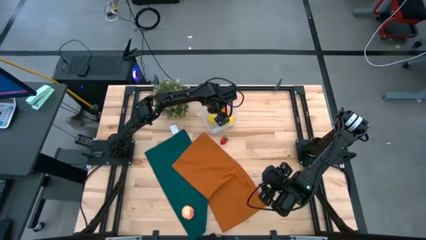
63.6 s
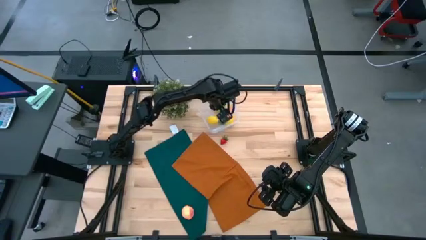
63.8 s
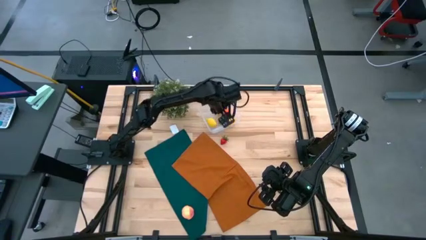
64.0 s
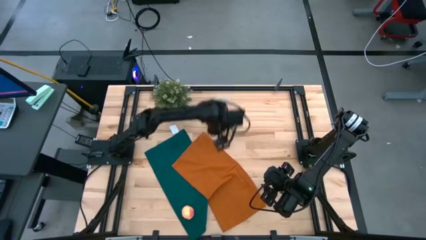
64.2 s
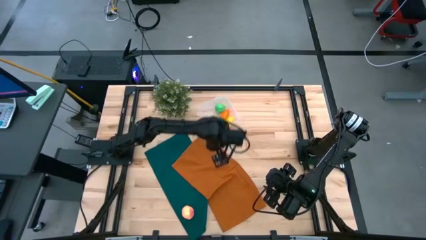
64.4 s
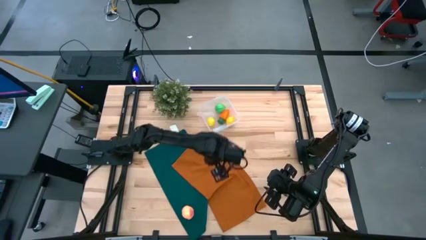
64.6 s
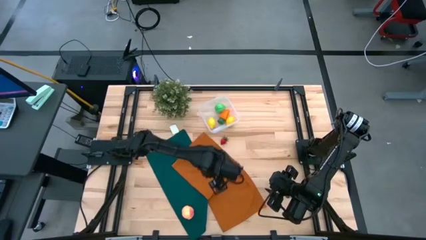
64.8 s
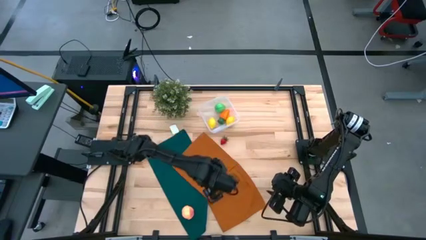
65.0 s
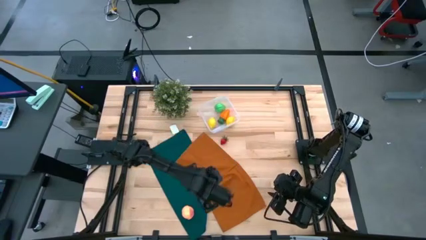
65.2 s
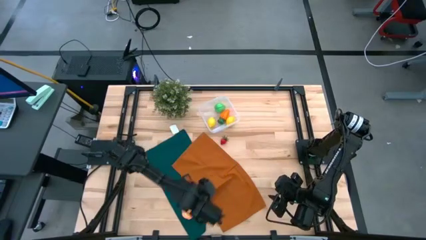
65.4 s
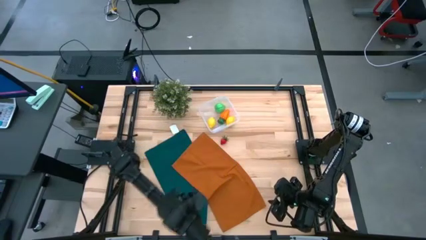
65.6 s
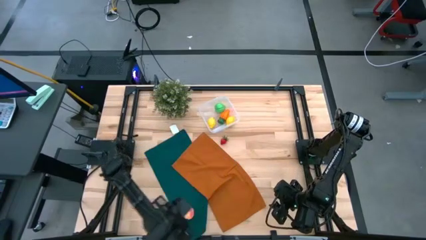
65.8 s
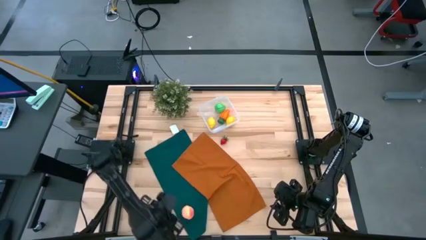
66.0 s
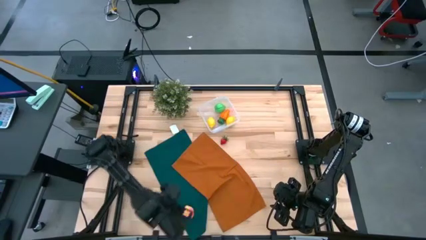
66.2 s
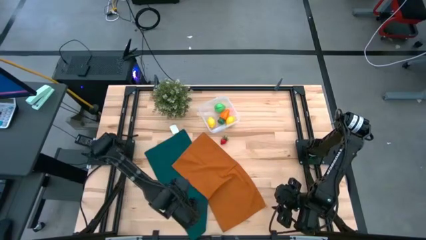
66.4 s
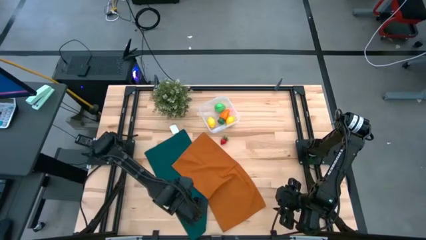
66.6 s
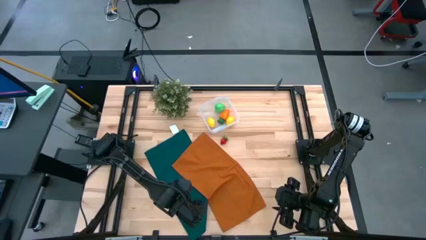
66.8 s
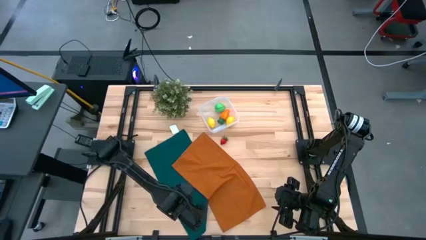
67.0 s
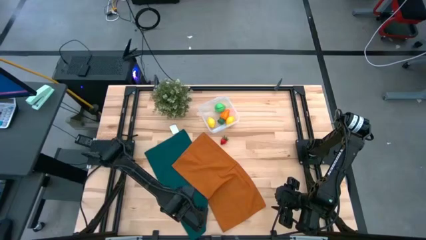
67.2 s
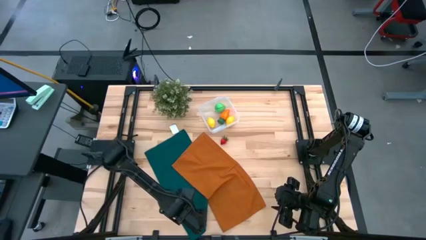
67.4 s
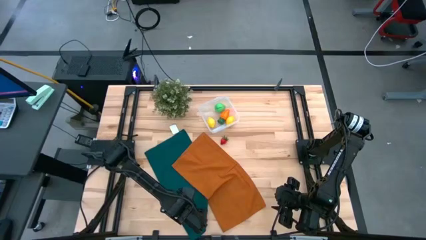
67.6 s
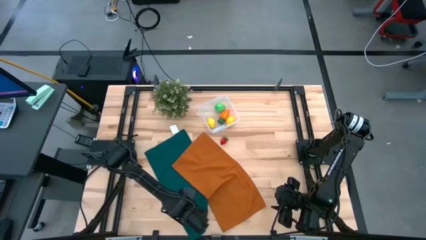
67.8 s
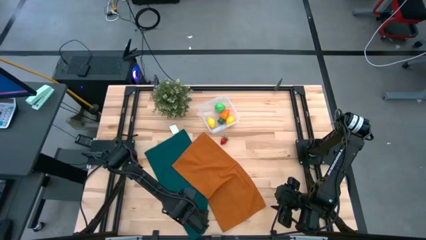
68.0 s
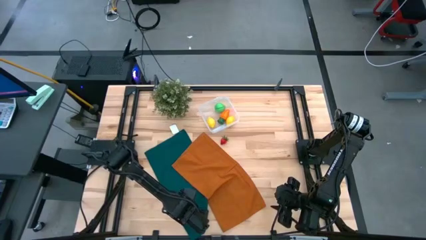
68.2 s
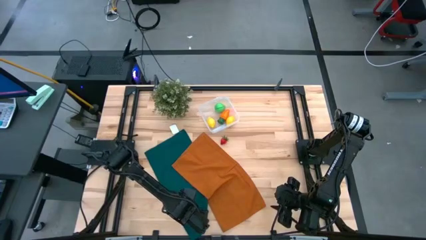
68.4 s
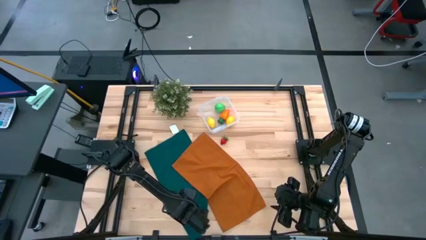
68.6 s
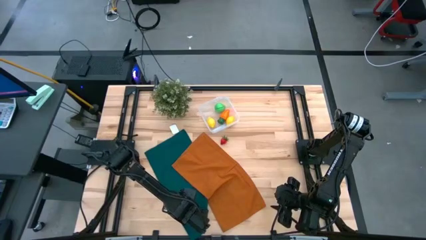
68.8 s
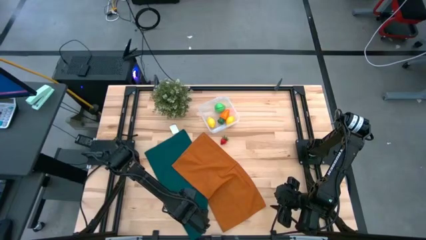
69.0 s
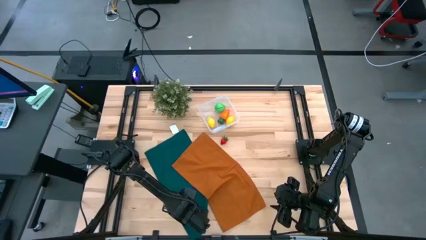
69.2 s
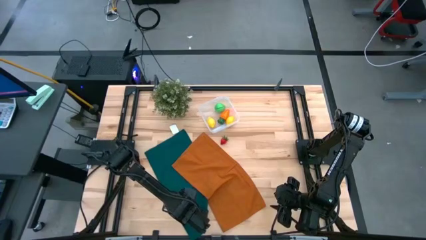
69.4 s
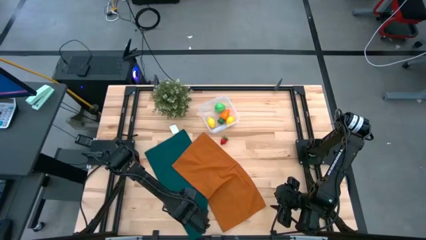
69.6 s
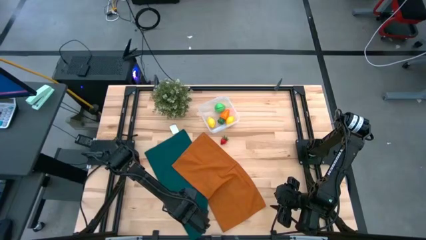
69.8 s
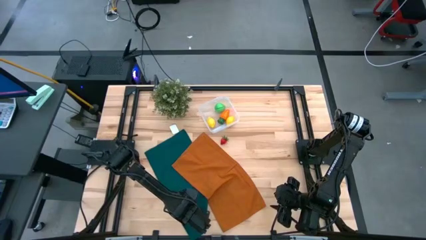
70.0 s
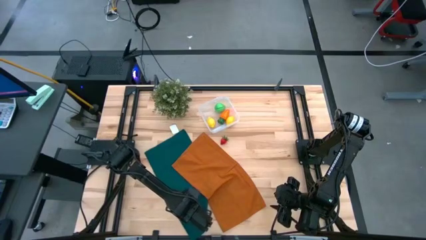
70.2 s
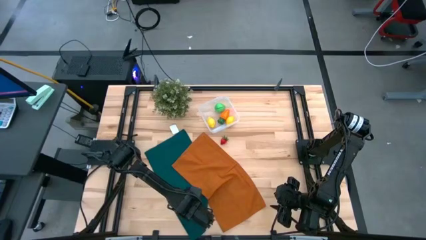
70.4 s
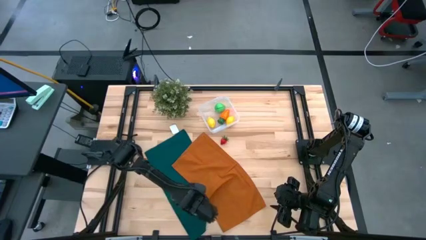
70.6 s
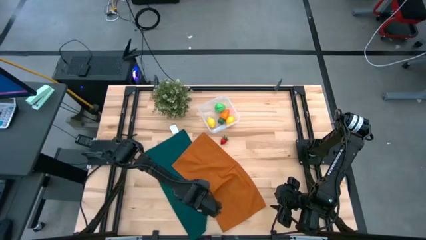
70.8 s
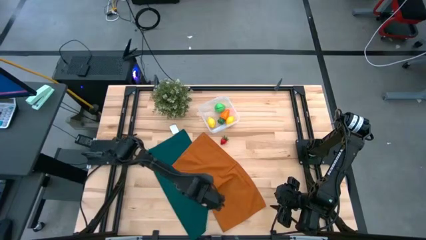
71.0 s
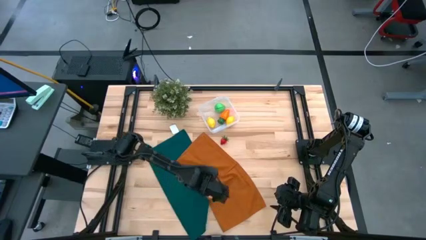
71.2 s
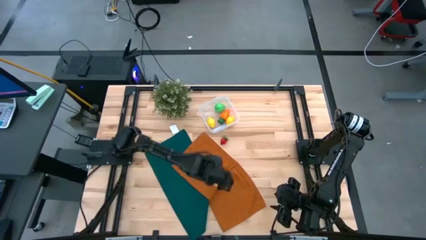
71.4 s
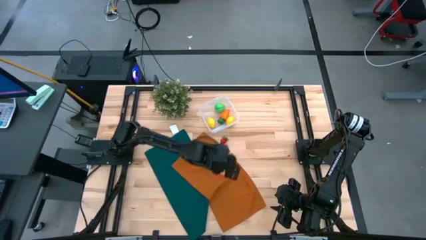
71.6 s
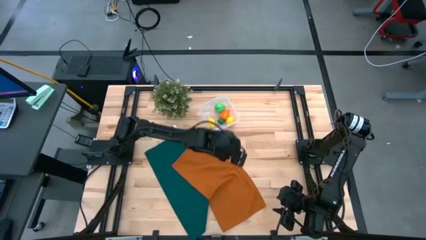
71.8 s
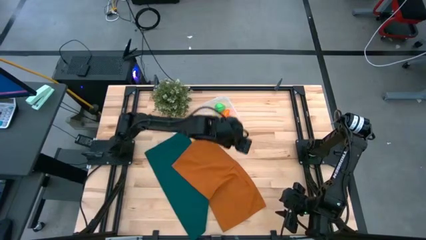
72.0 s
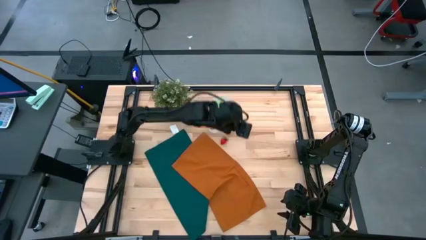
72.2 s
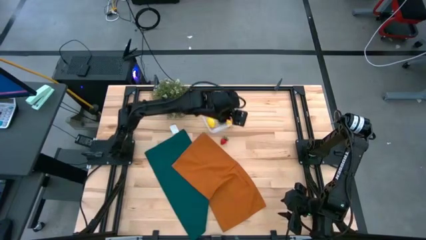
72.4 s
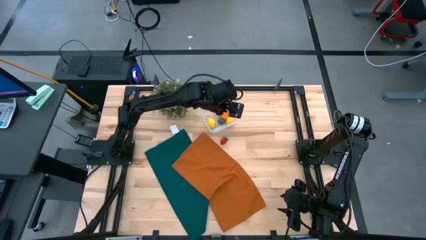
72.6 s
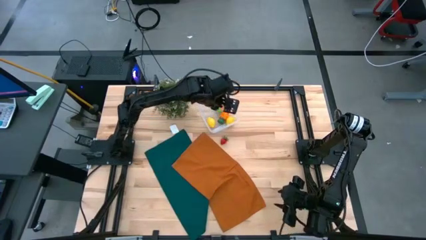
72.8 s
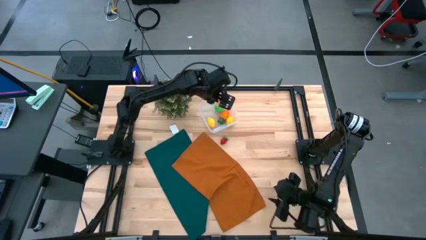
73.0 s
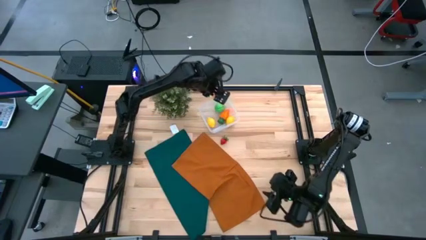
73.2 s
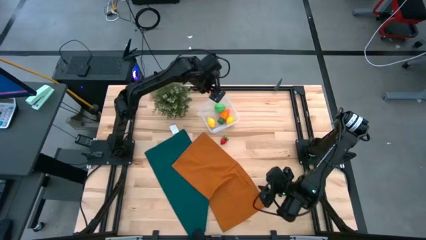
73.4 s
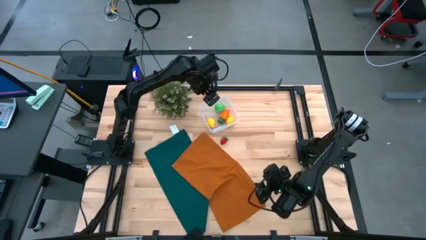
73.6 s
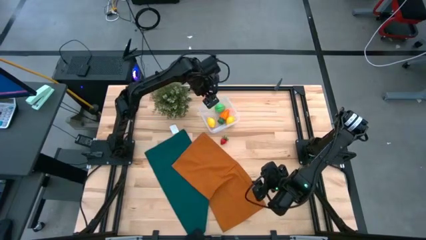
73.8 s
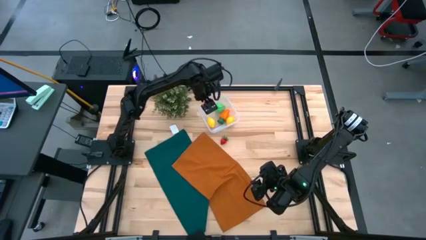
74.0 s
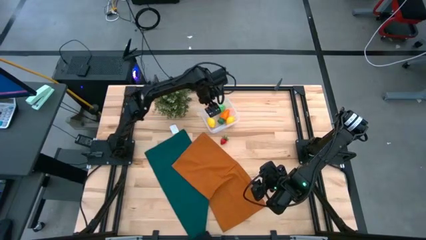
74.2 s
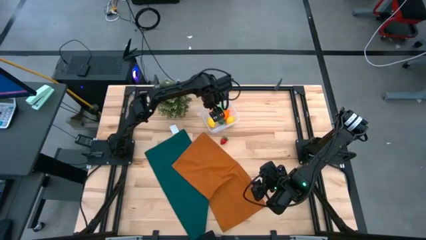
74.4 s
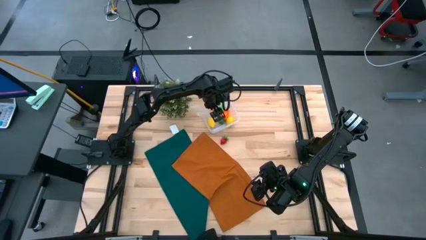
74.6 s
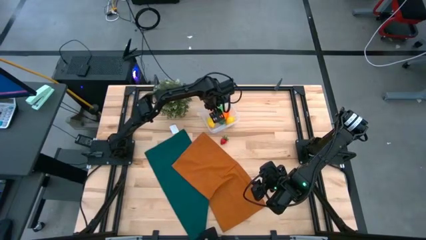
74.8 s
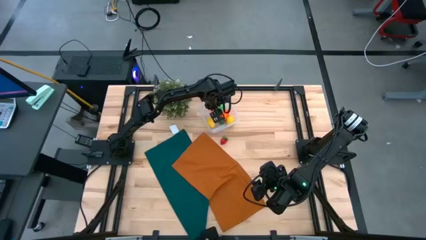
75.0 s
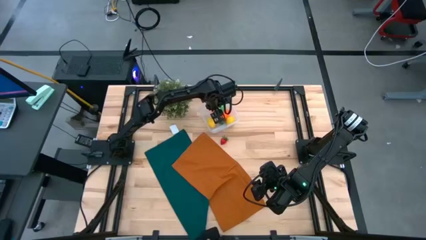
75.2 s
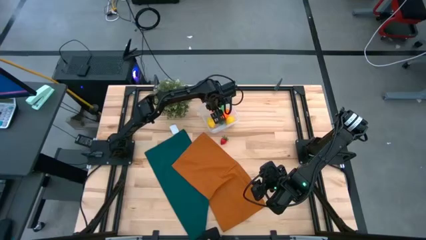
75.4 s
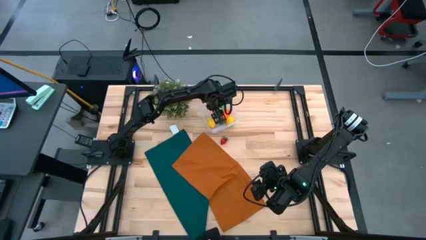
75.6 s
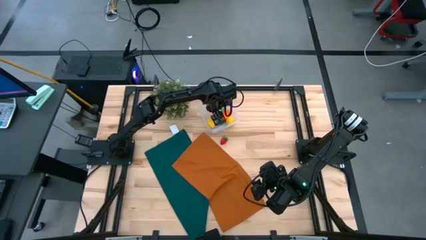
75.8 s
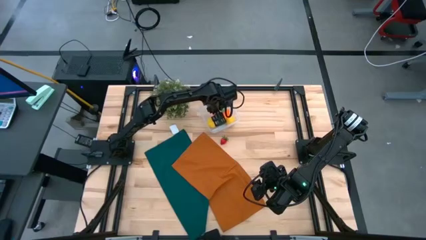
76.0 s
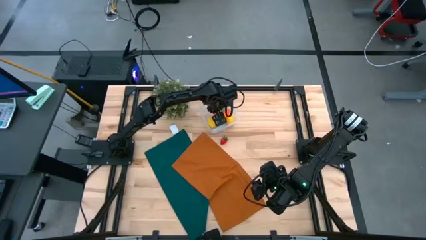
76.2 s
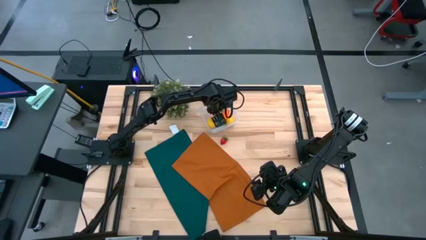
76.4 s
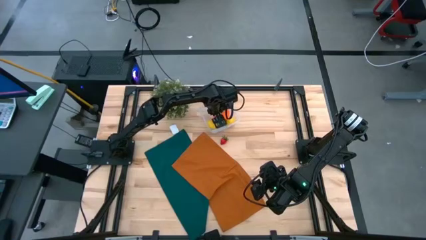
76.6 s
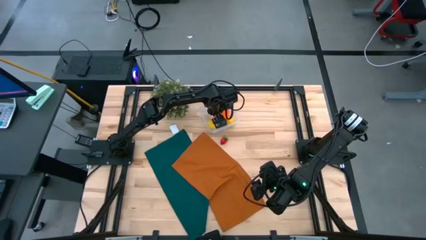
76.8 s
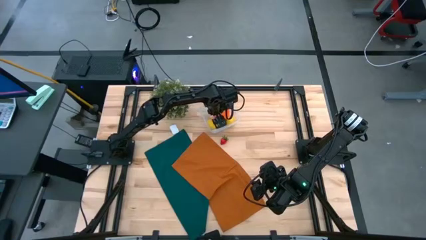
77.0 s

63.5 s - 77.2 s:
Task: Pick and placing Produce into tupperware
Put the light orange peach into the transparent bin

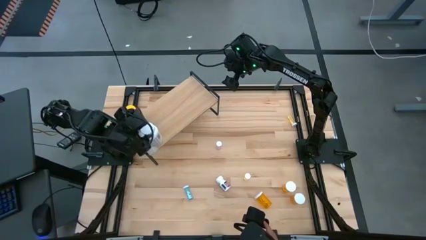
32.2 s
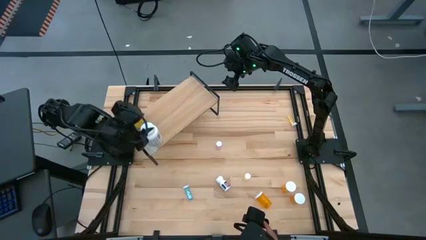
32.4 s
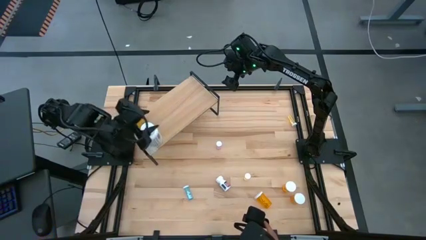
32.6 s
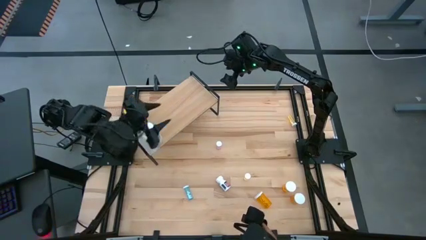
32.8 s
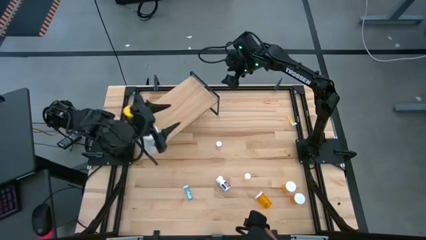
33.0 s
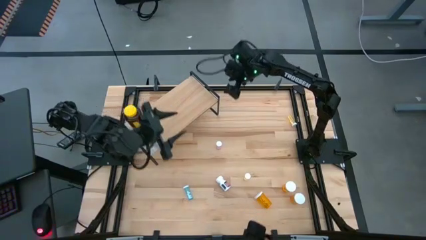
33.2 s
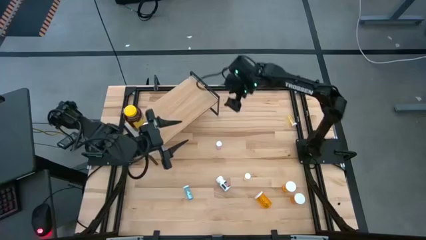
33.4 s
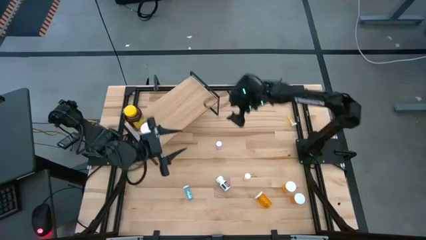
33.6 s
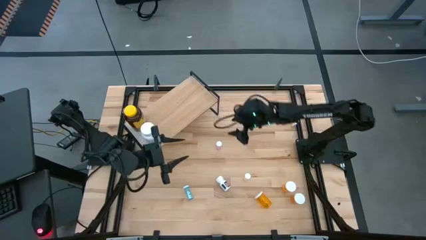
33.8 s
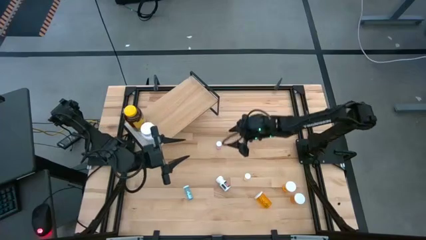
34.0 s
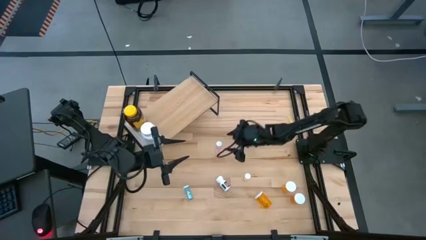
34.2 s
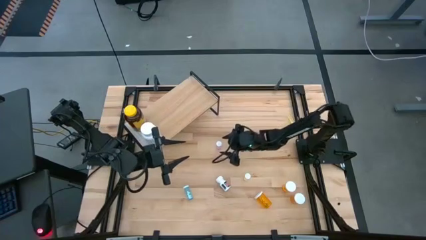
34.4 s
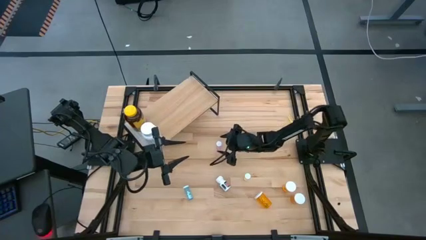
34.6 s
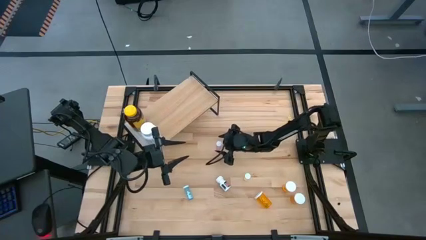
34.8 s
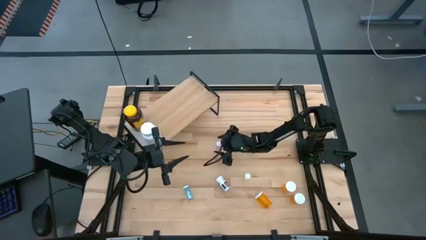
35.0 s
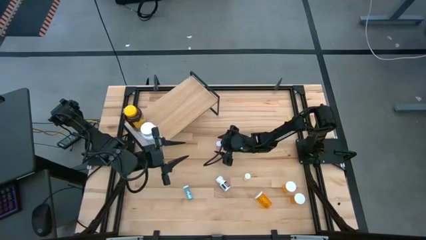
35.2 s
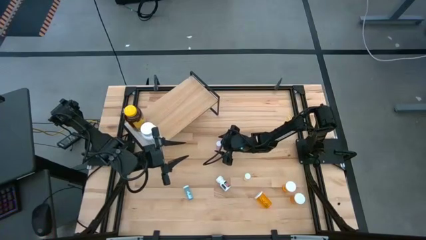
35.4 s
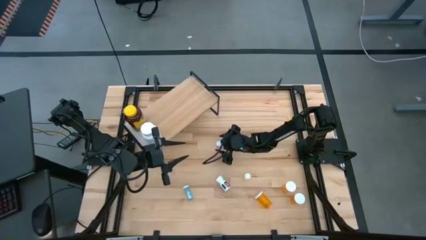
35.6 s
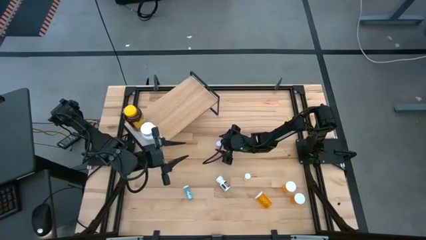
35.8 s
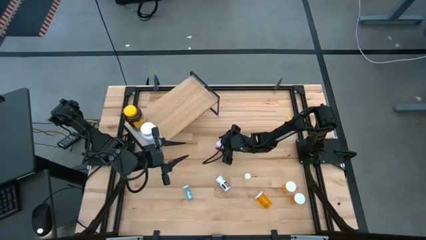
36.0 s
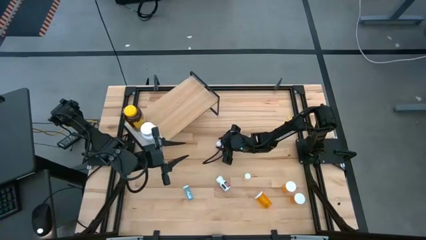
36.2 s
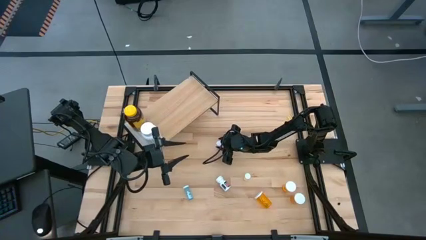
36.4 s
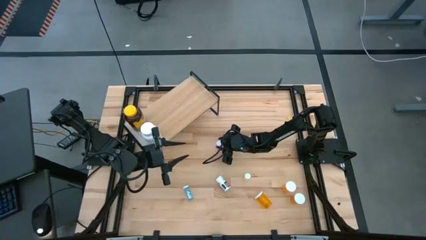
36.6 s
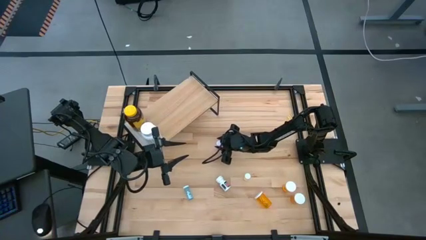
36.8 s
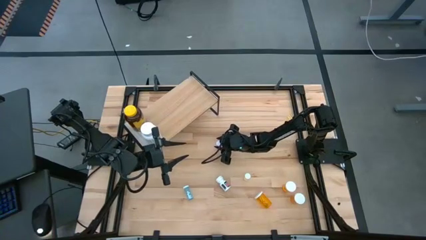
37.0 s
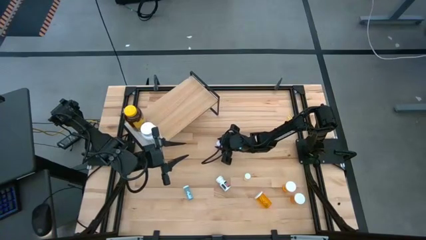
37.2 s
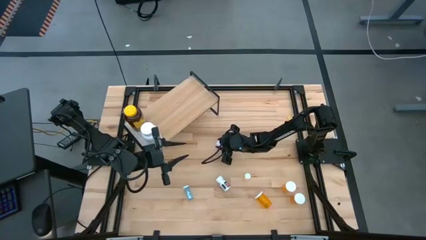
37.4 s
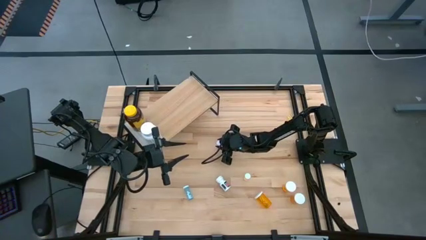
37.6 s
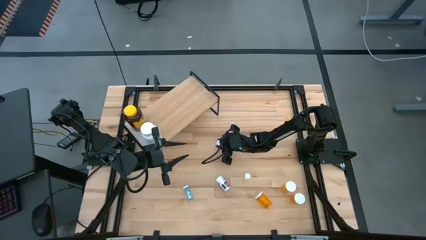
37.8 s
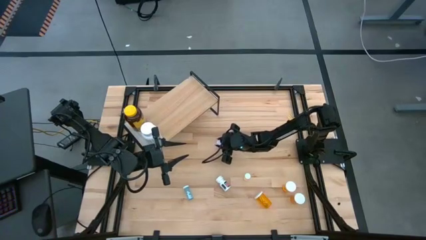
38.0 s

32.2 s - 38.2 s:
Task: Pick and place medicine bottles onto shelf by color
Put the pink pill bottle on the shelf
